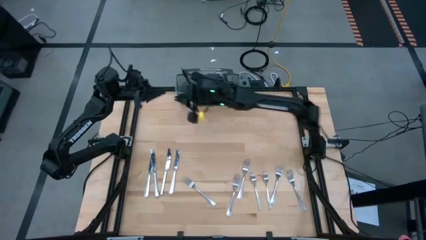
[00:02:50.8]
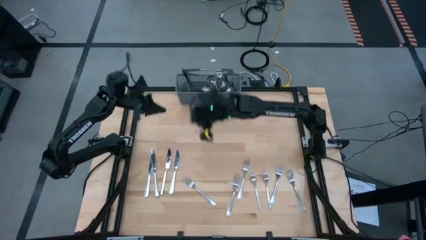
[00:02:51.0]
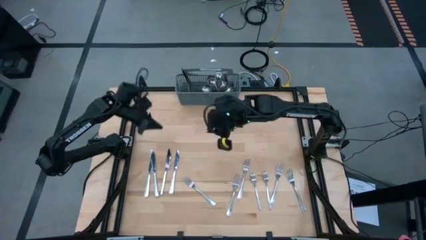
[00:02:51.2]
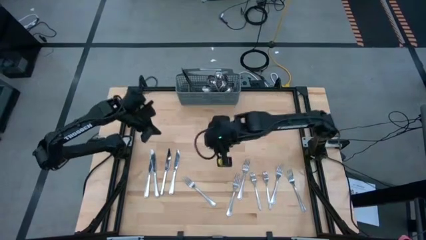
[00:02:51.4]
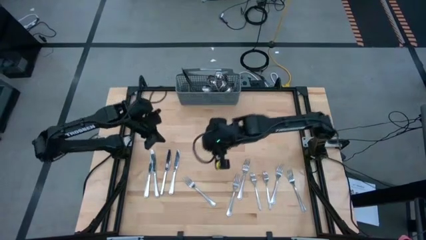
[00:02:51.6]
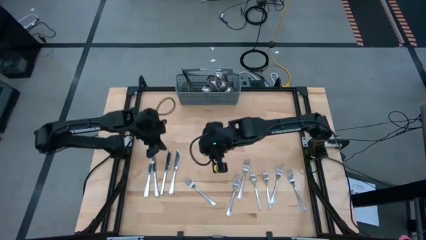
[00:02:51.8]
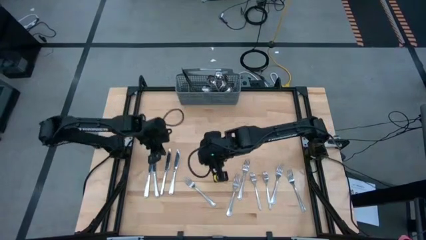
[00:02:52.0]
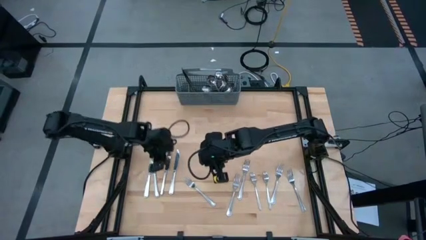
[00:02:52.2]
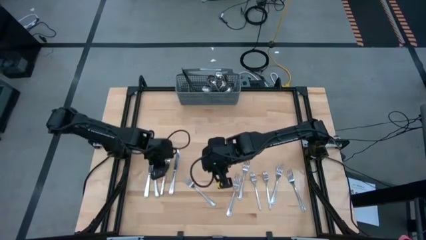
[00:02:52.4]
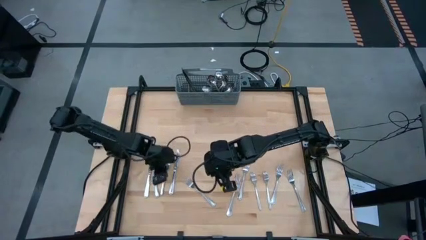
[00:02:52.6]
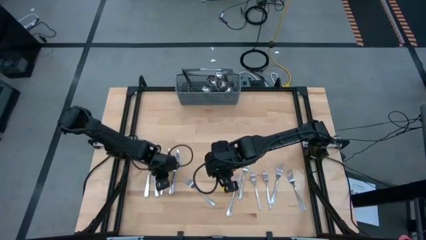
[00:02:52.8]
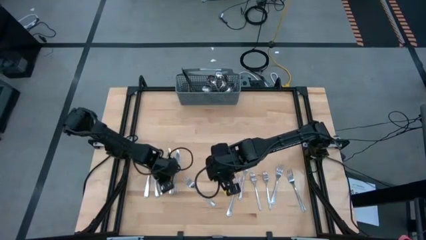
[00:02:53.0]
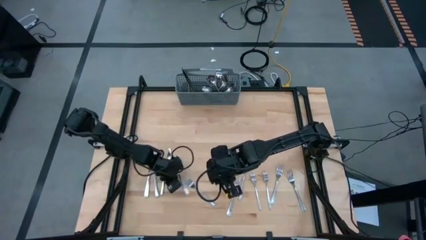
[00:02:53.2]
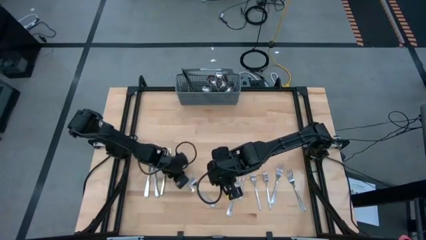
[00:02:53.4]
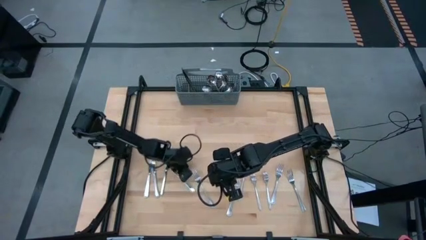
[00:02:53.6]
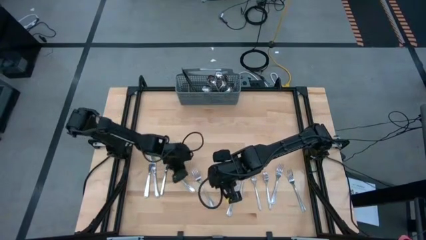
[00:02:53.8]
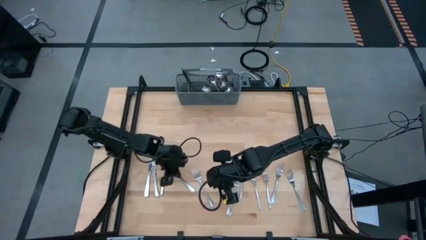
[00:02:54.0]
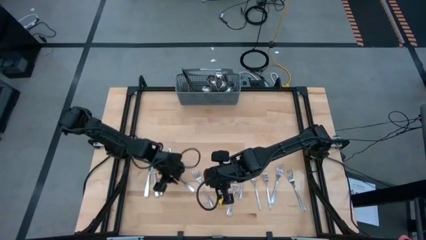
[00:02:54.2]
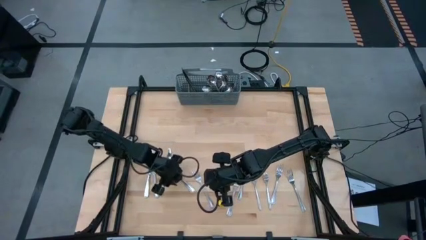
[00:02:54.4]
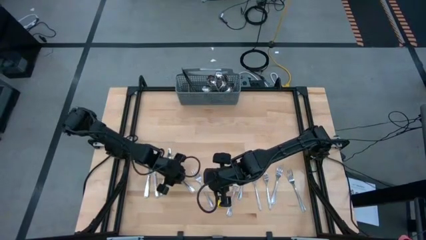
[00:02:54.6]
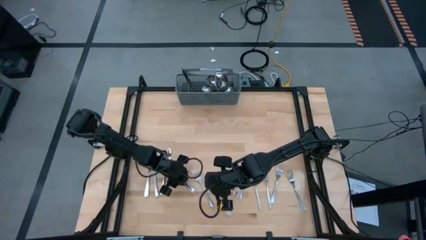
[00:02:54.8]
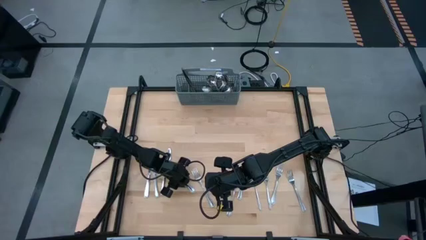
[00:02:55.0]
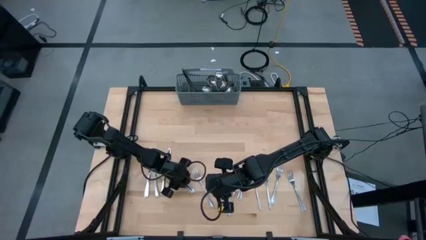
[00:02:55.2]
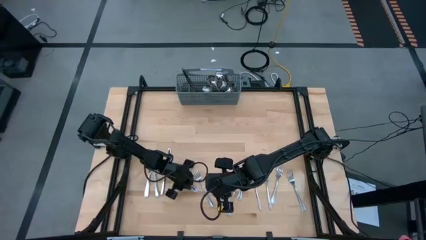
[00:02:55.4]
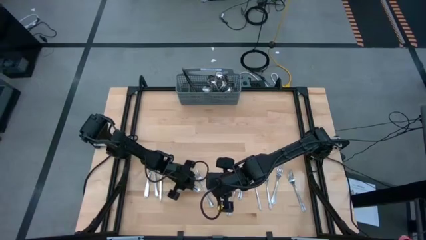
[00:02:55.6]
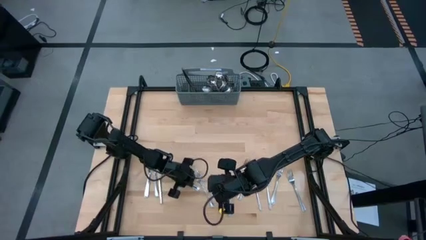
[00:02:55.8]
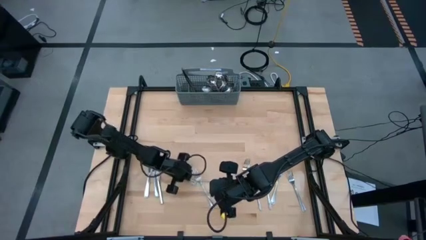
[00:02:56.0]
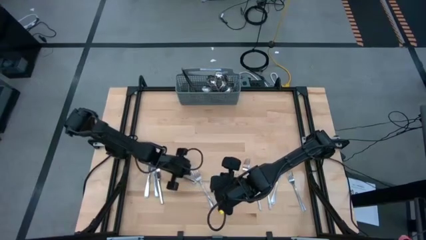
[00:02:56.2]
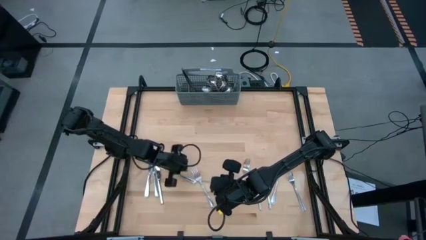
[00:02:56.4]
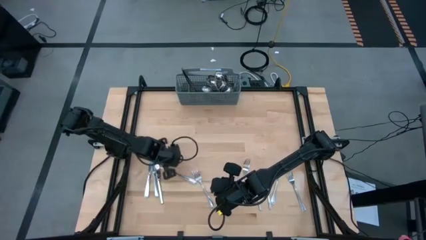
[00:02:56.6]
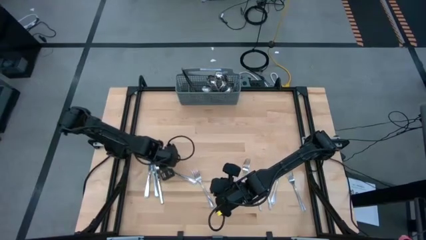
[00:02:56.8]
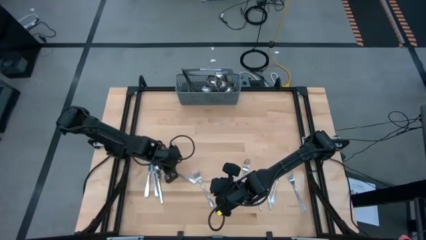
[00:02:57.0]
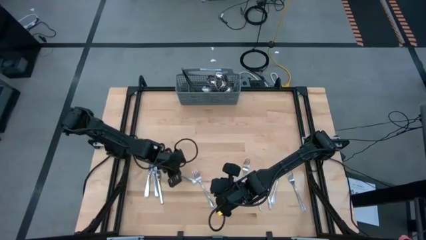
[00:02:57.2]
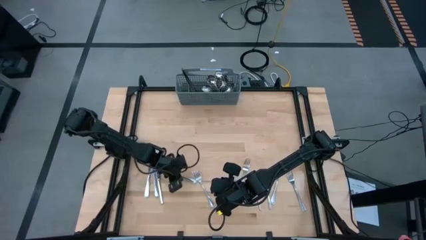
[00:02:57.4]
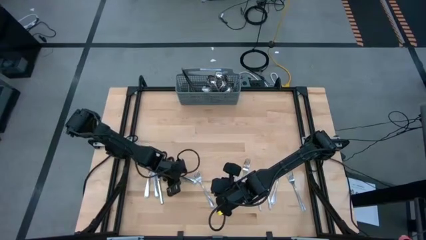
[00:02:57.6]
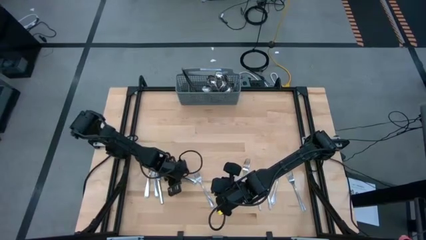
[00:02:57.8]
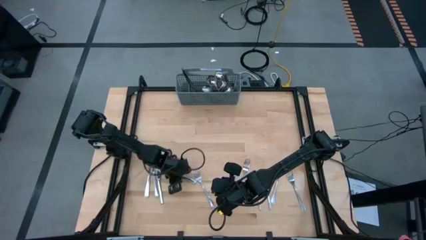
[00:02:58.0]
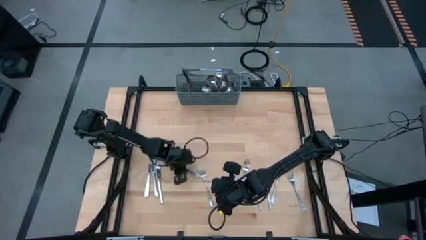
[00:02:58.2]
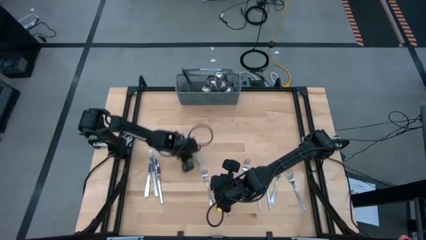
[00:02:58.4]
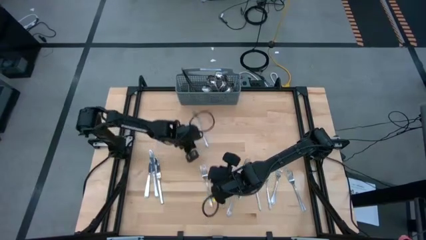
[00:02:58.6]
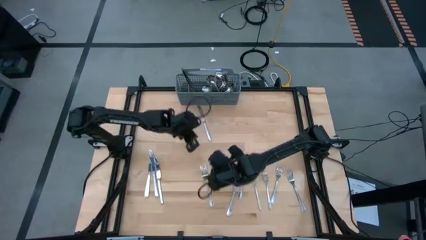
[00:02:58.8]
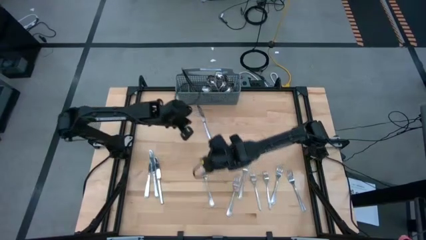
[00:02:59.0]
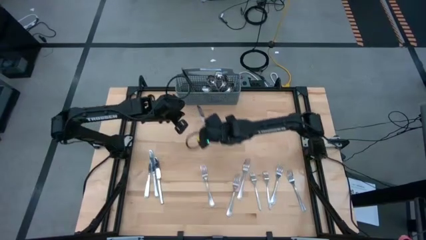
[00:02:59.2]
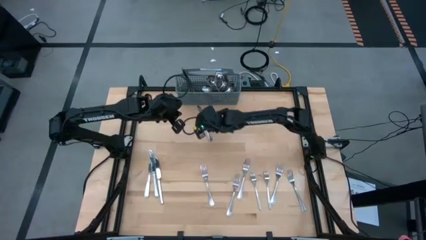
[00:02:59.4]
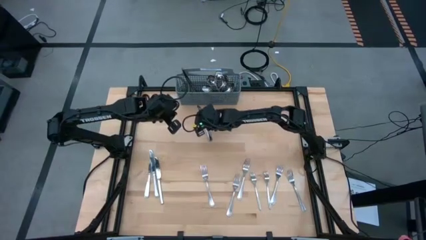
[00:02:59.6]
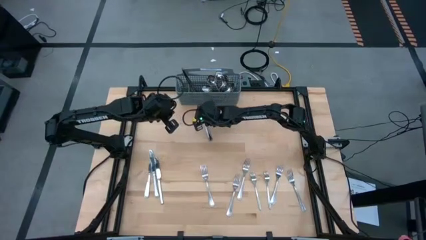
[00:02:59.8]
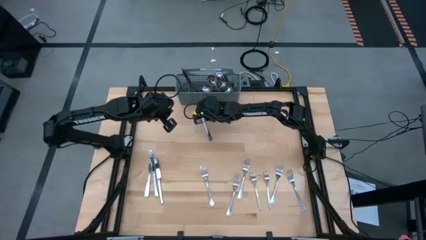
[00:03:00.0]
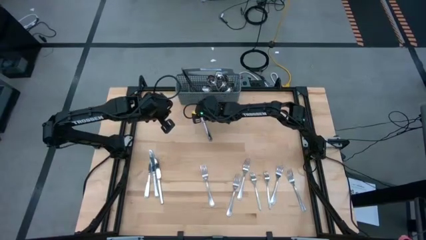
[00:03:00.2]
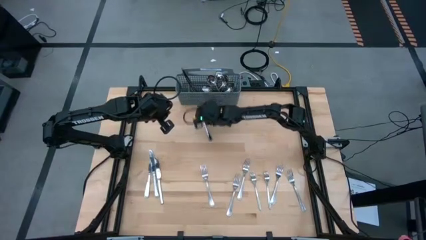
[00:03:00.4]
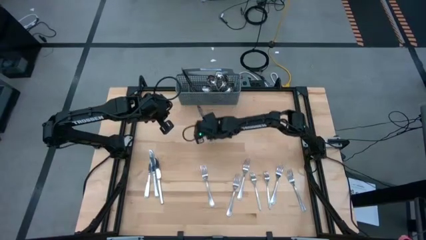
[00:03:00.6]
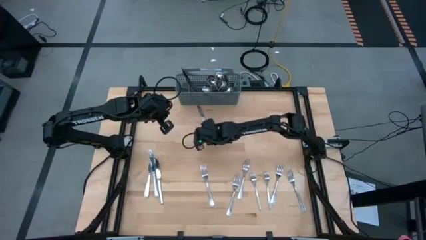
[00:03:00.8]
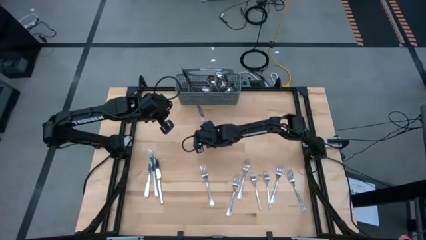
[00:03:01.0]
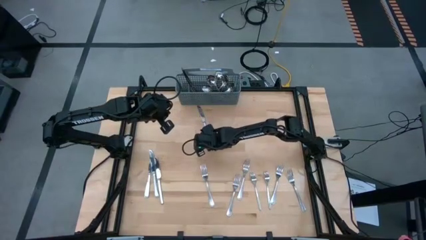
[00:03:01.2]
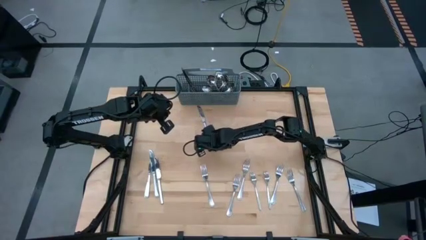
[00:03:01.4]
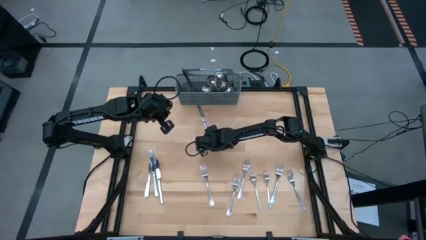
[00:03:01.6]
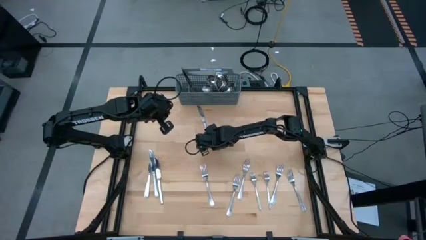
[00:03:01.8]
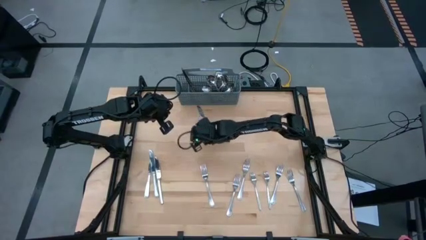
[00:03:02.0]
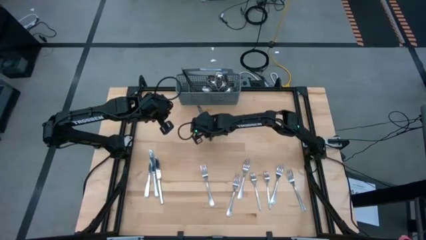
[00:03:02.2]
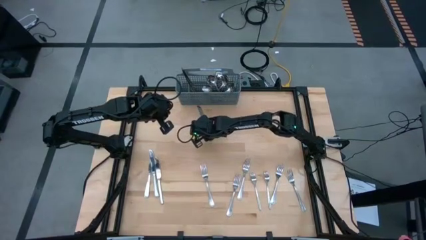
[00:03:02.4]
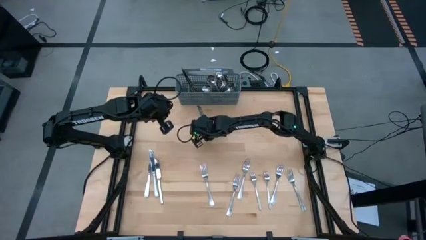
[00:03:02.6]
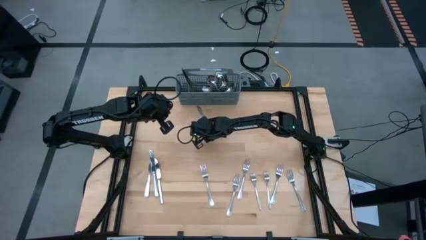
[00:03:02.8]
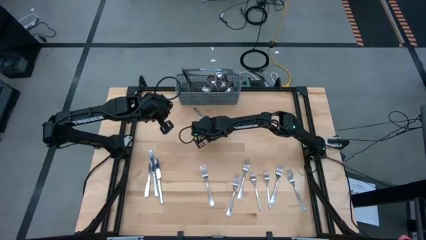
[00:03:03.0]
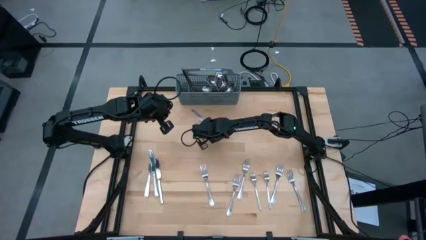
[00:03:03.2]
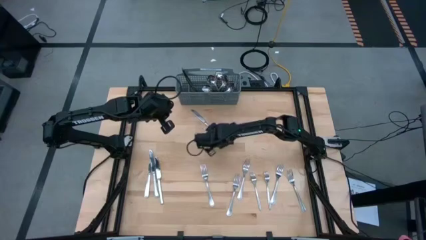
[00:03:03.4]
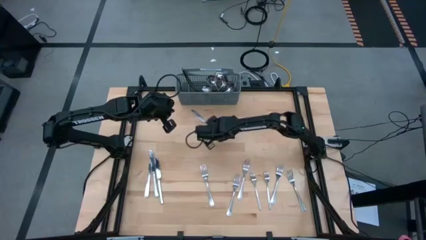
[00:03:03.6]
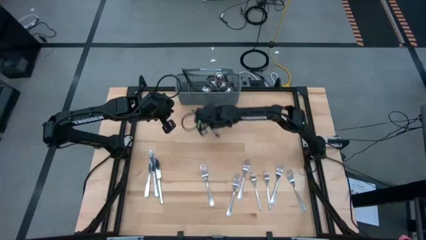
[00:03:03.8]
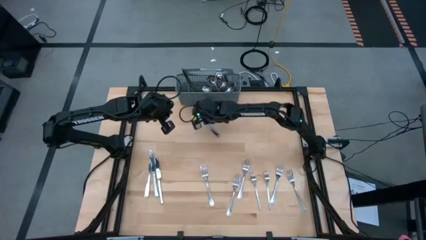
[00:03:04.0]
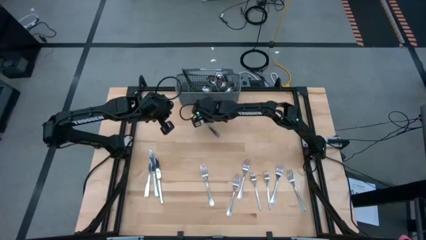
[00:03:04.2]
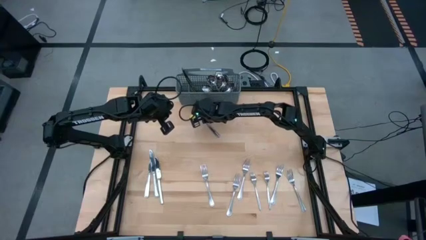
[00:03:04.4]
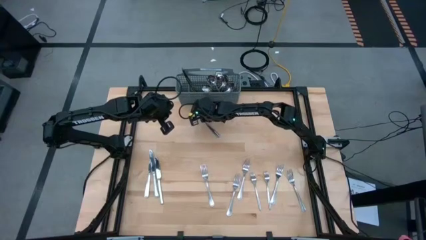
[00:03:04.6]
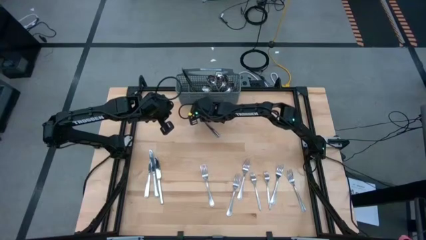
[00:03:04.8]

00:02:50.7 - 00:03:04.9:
Task: Sort silverware
Put the silver knife into the gray utensil holder

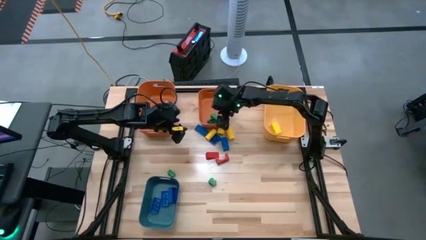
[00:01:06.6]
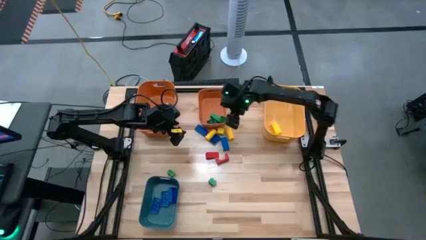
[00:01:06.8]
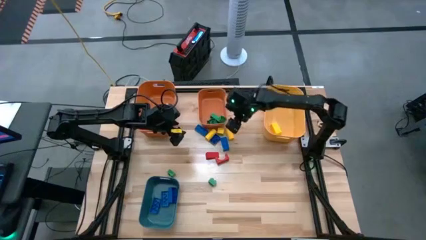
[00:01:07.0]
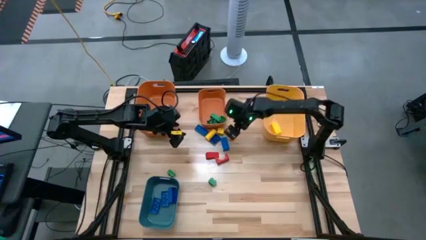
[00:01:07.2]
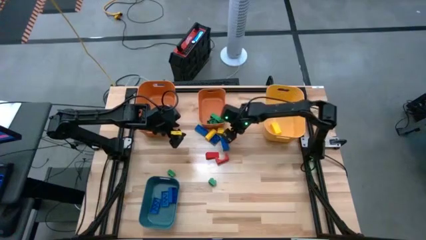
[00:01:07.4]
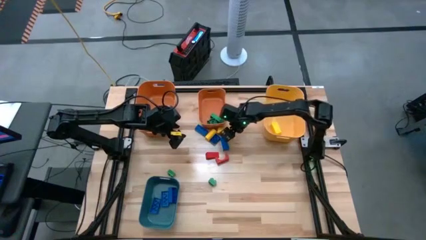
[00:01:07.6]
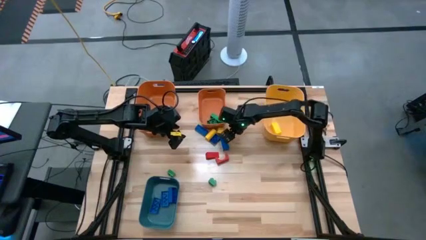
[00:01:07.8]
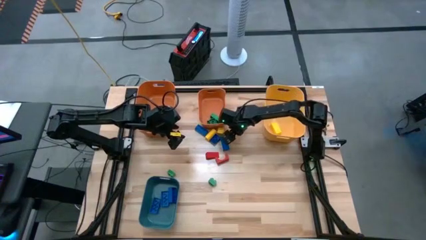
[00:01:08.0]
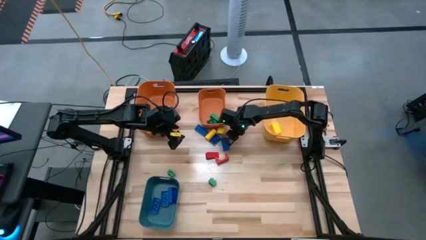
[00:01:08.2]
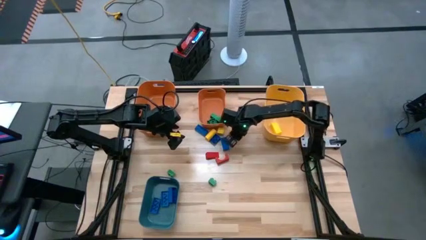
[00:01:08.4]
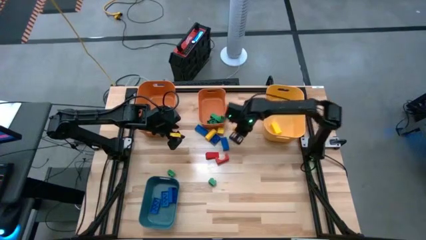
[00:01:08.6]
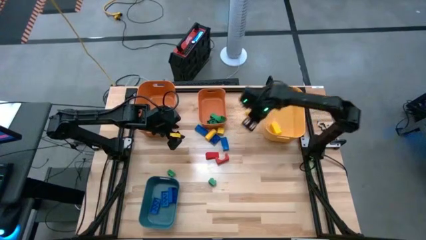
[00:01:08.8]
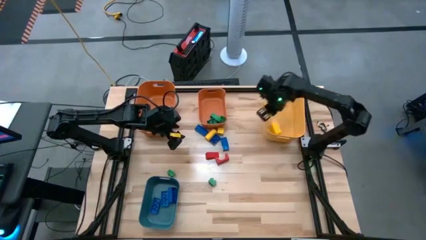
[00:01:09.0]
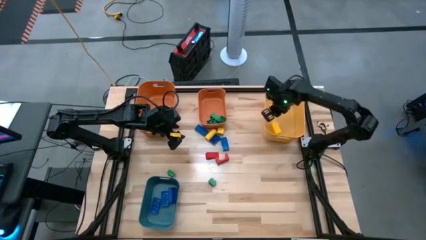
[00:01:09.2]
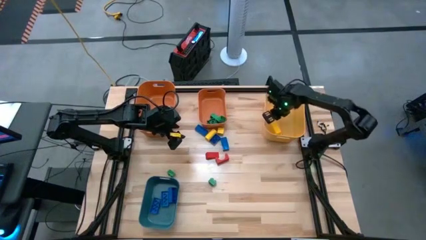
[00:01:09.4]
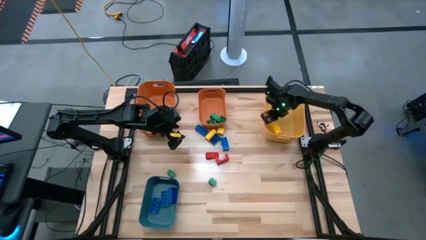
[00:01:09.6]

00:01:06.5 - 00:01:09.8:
Task: Sort blocks
Put the yellow block into the yellow bin
